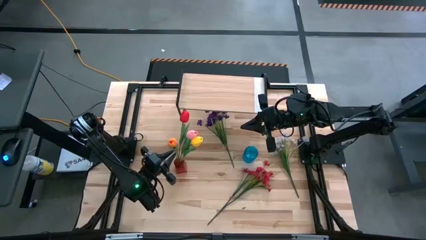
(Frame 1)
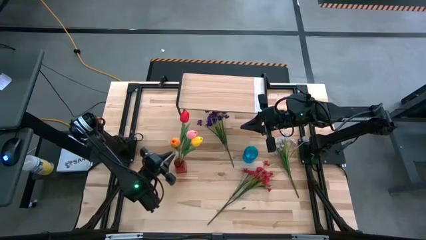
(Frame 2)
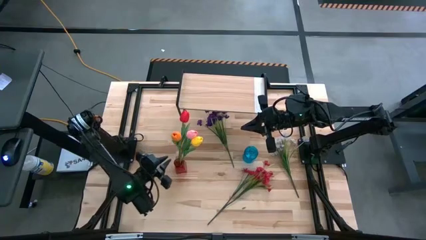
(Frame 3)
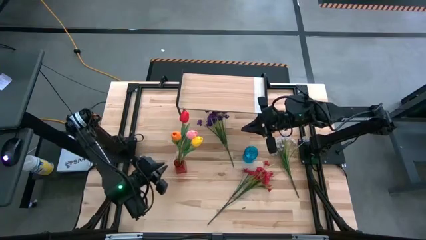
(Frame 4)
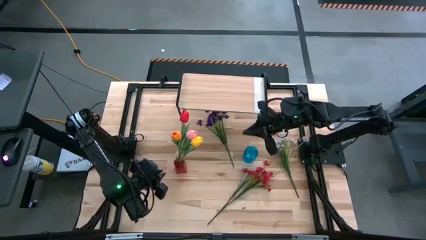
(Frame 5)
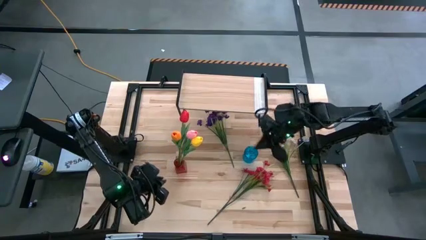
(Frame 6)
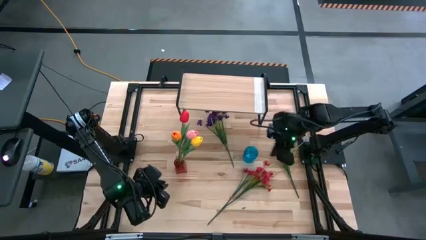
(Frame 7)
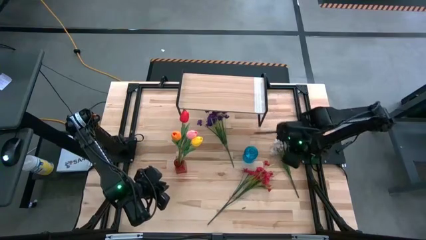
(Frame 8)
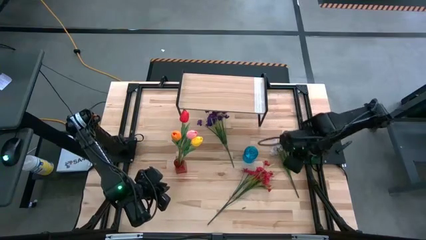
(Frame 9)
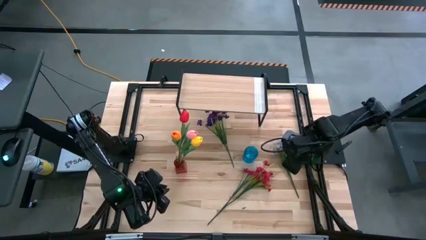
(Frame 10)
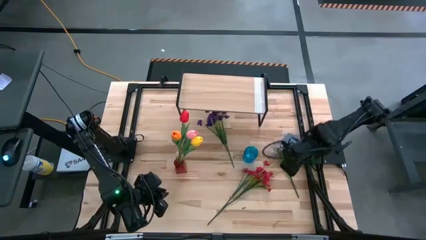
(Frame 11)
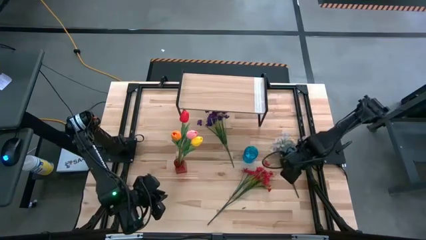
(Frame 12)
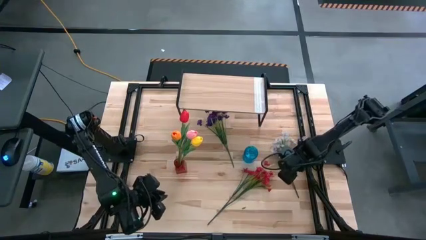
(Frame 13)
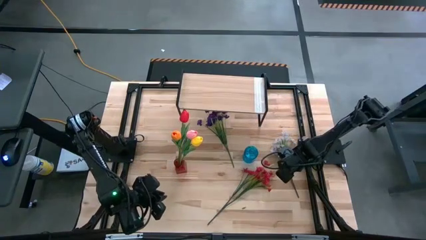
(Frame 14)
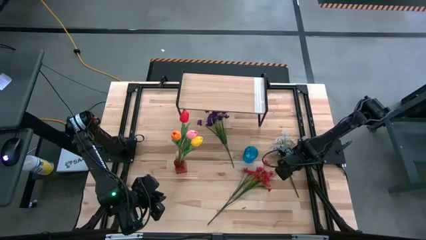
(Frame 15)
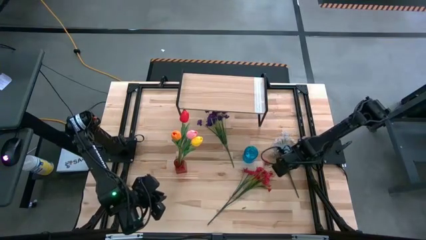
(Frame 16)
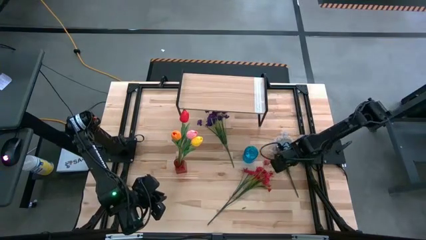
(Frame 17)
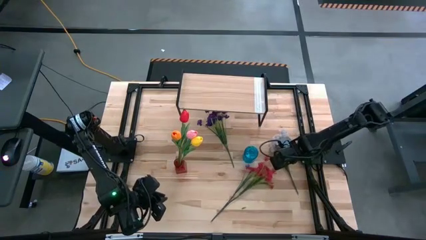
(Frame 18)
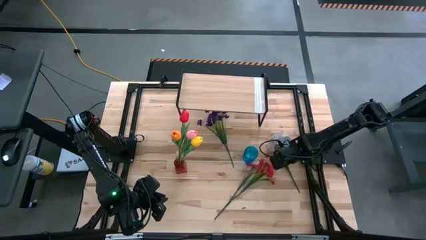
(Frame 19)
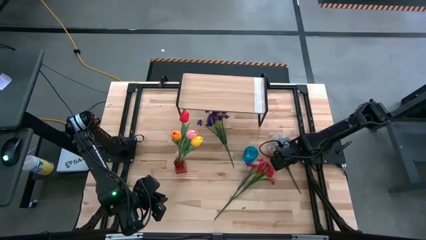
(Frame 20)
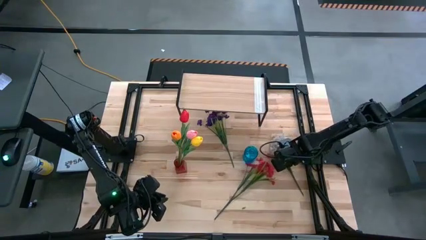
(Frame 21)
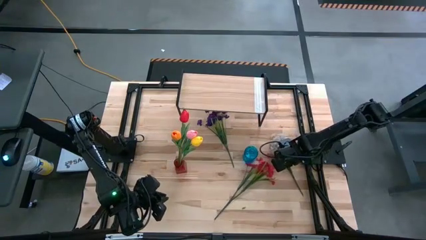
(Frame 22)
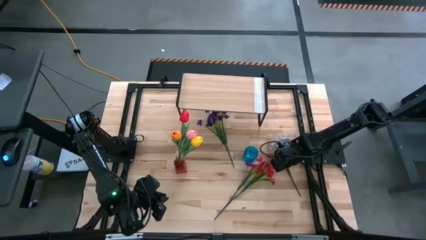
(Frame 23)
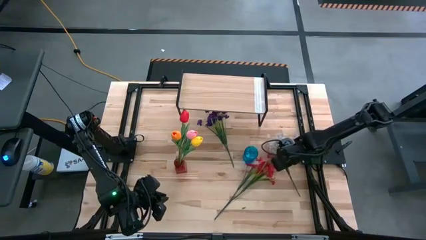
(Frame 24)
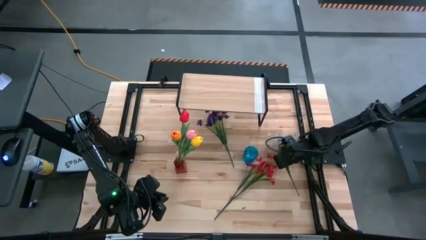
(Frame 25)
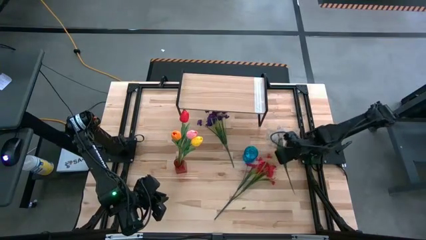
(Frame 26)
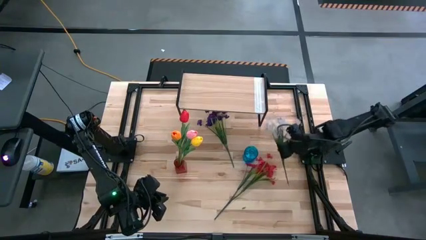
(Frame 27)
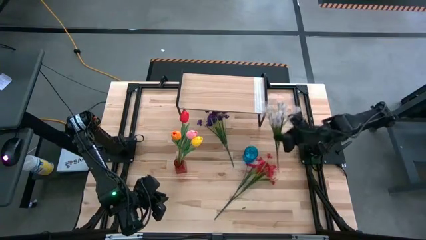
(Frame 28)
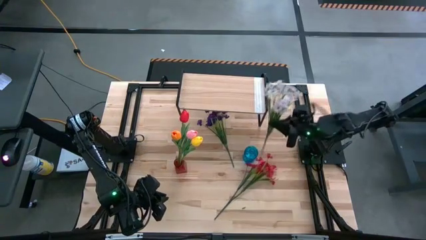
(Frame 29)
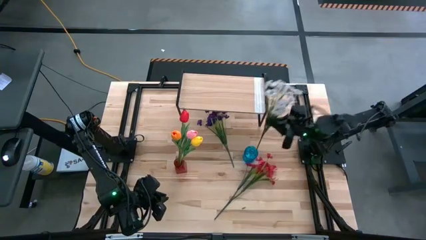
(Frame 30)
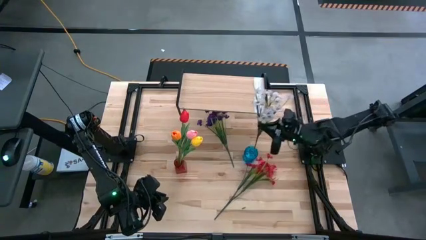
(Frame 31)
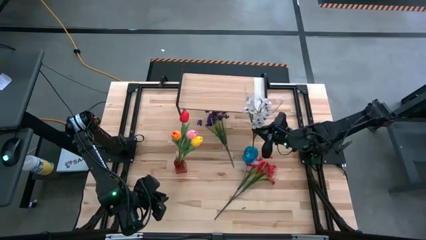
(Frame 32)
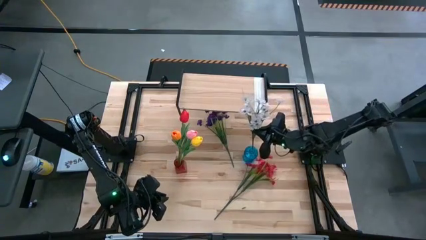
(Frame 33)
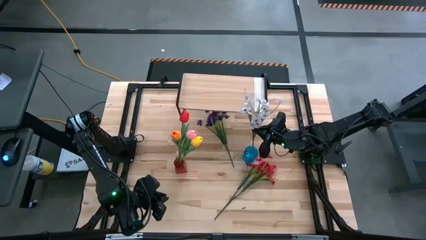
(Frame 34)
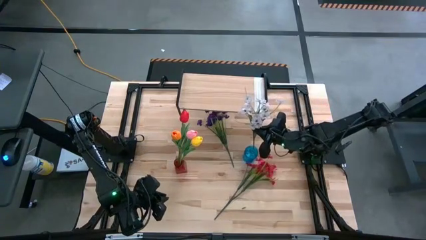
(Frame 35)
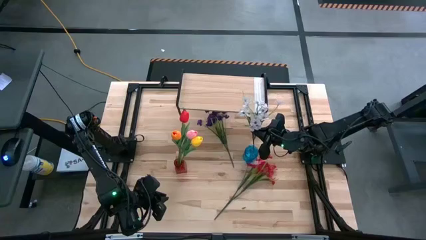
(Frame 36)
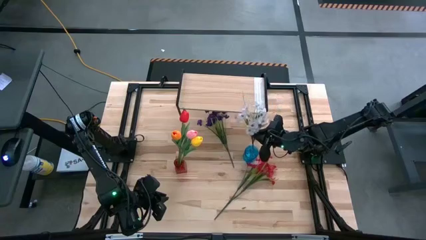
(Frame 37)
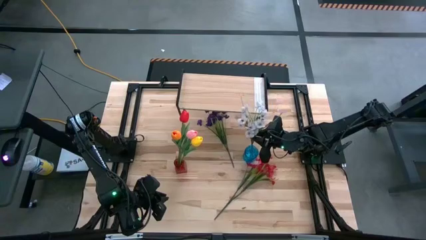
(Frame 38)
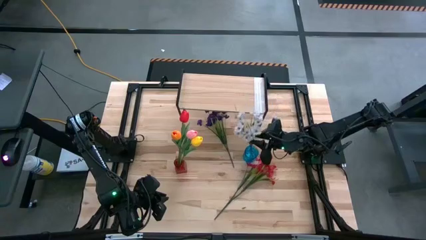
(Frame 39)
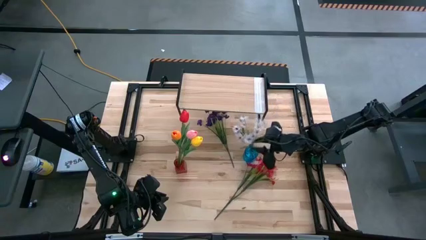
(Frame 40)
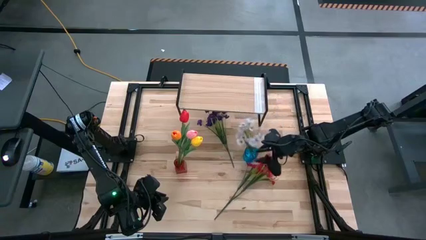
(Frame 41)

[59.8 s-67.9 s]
Task: Pick and place flowers into a vace then onto a shelf
Put the white flowers into the blue vase

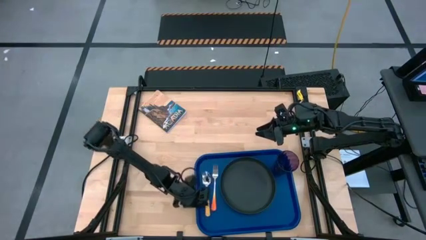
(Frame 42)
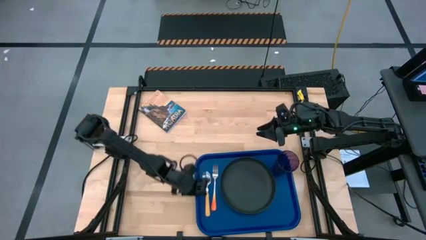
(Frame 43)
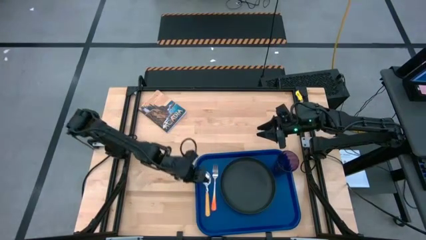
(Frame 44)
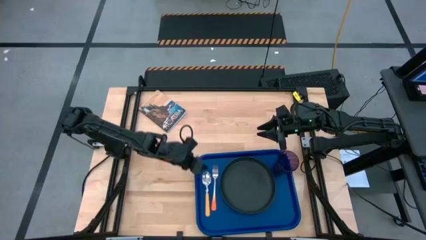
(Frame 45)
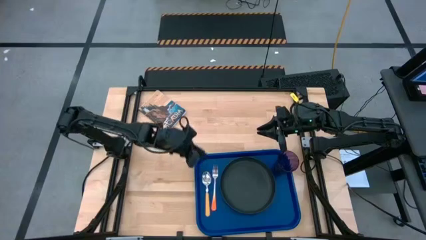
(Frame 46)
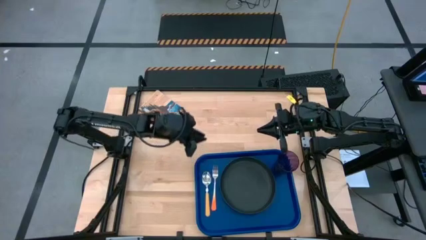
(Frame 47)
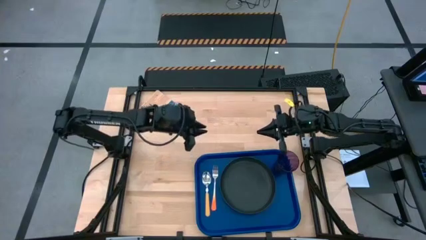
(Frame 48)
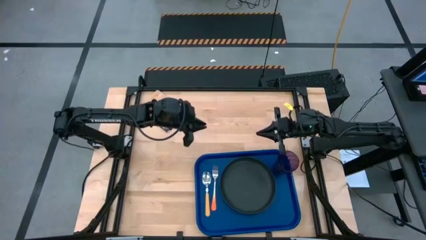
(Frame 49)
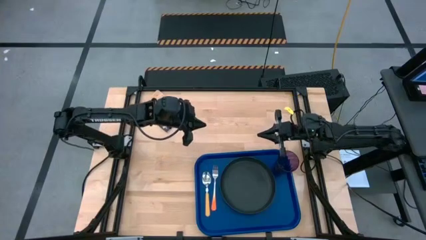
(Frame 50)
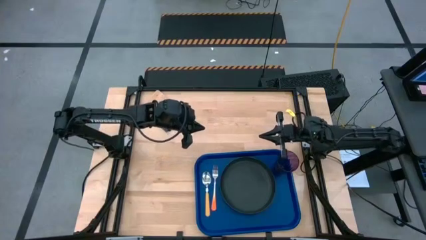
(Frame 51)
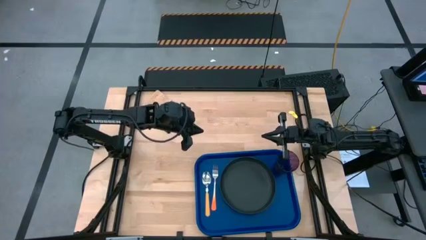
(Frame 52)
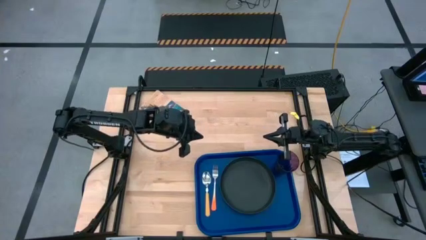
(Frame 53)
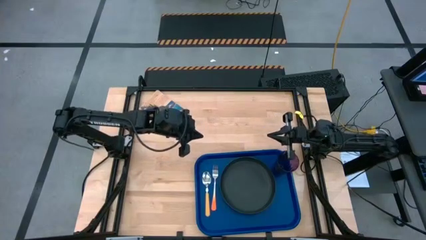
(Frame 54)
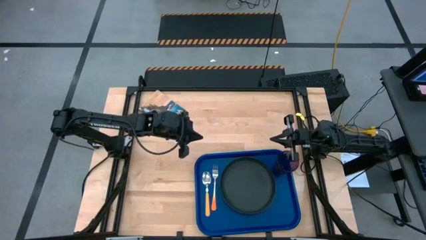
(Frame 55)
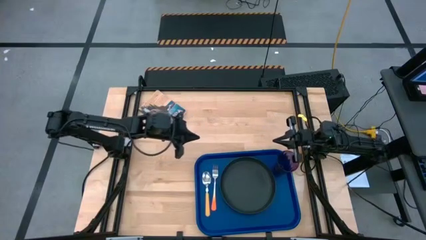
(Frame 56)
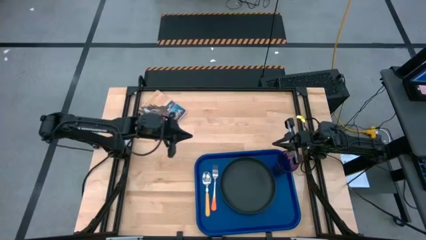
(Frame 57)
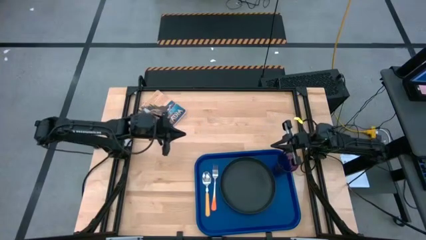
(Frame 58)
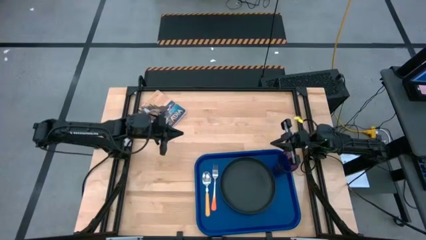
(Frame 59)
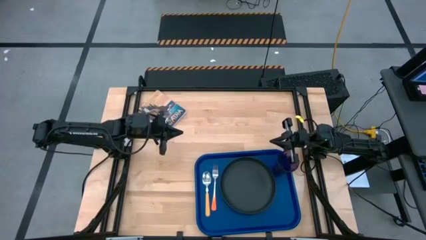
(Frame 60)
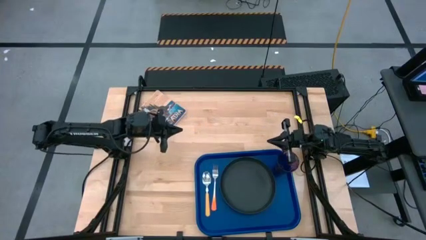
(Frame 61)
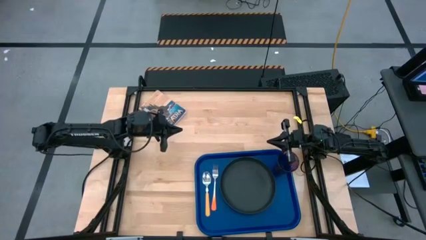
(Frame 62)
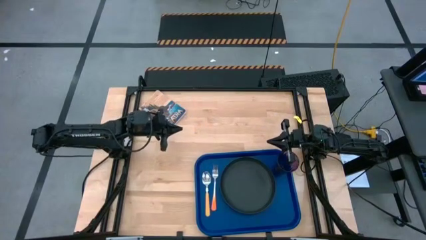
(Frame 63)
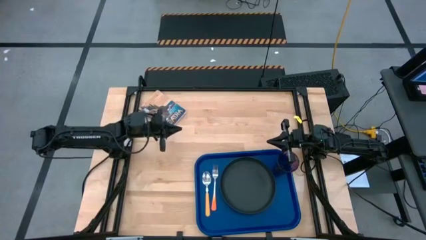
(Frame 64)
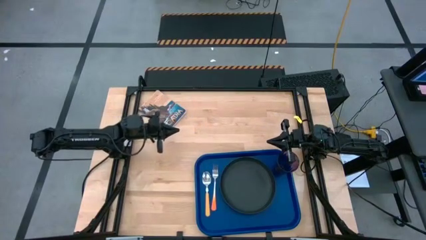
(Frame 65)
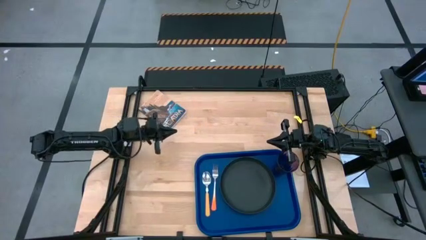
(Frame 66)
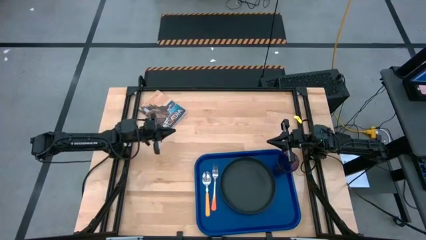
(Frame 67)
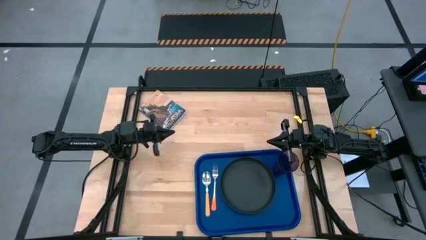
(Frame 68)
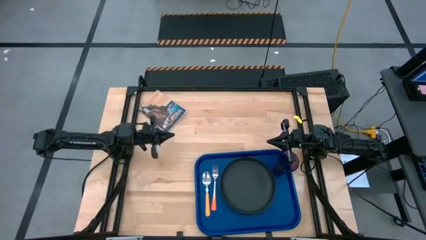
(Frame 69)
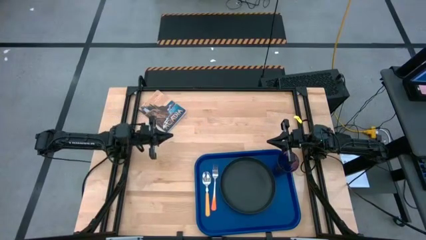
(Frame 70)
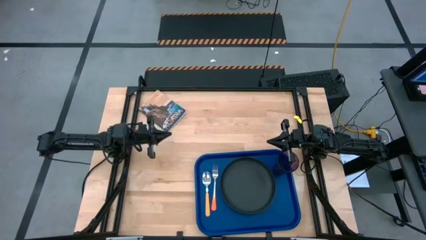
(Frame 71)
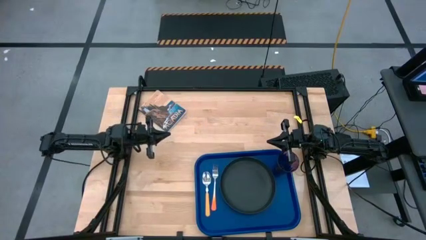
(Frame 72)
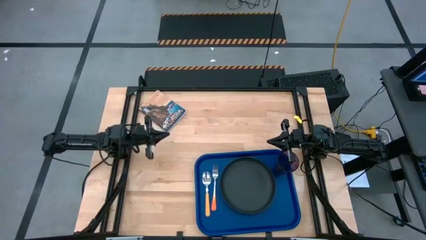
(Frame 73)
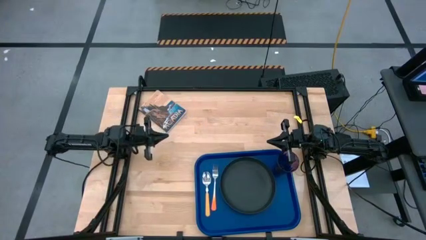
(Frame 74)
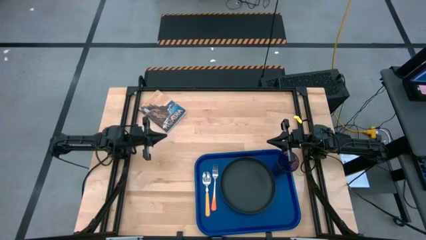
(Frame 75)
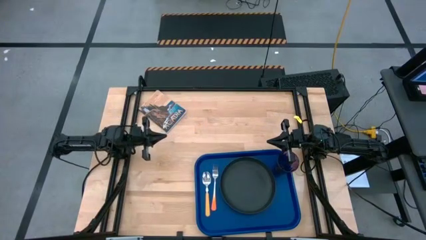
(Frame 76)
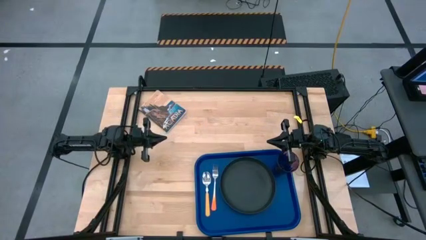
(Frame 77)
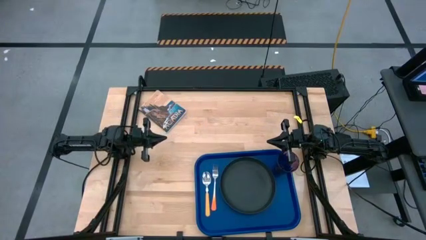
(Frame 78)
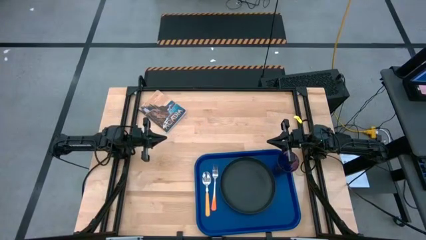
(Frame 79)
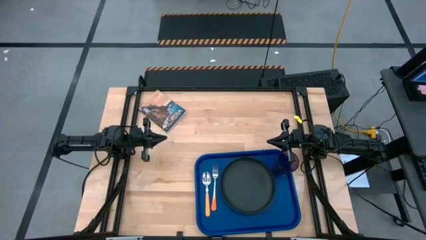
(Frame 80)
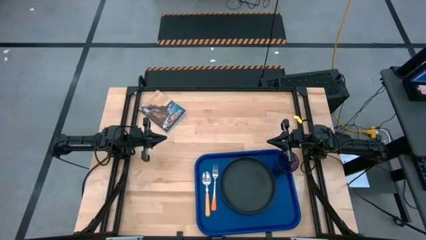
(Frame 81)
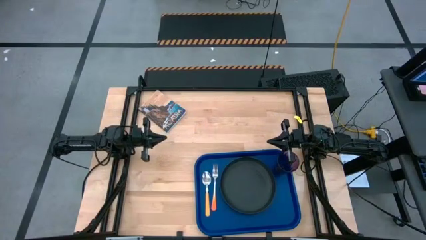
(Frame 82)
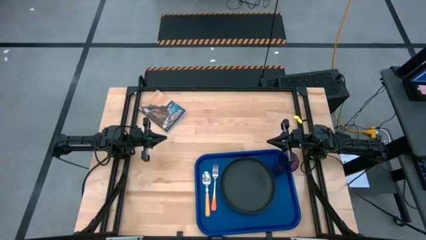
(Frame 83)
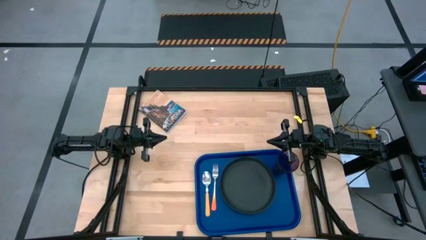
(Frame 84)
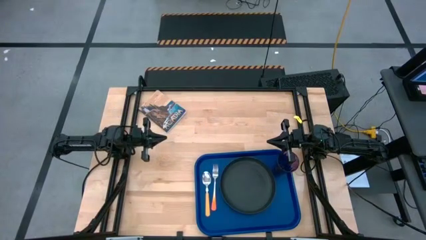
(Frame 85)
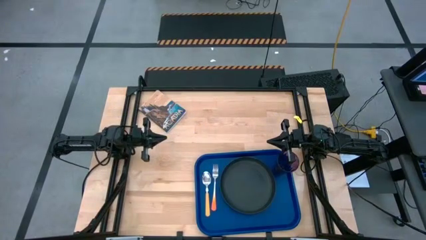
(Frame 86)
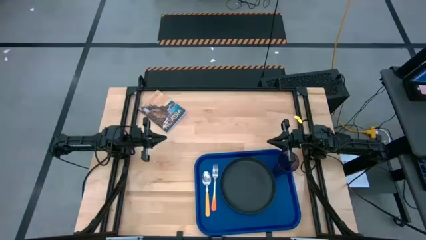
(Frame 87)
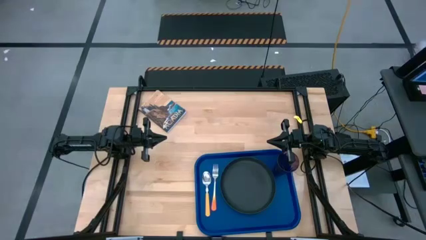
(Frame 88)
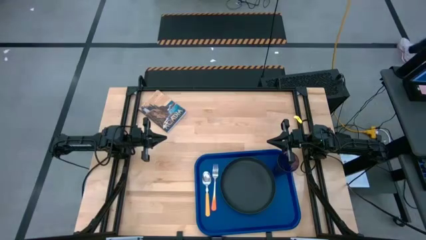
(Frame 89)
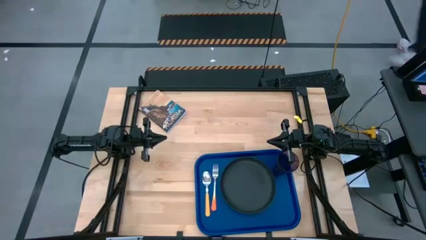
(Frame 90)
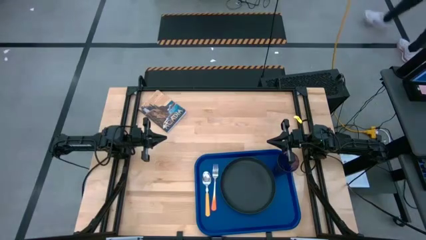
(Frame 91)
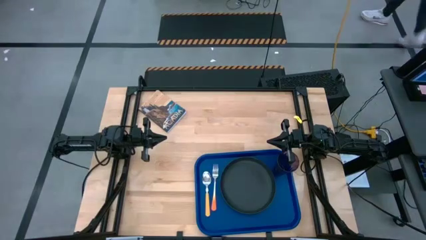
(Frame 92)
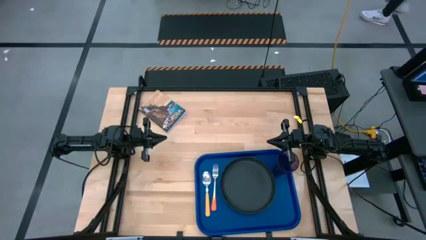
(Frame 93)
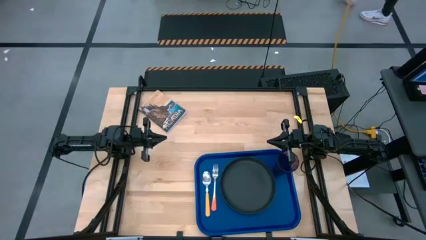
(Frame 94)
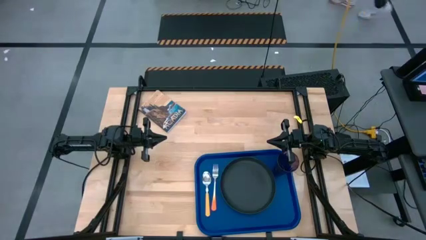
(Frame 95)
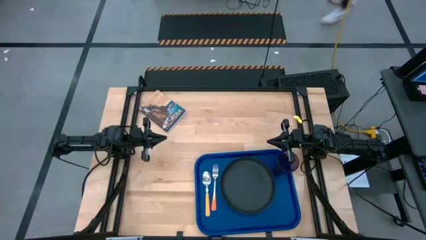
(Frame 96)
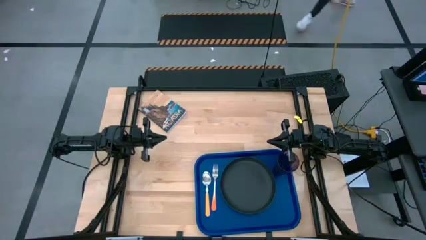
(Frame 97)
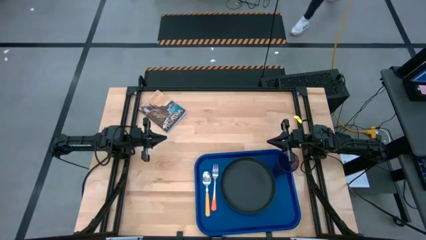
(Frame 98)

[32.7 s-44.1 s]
Task: Pick and place plate/cup/fork/spoon on tray
Return to Home Position
